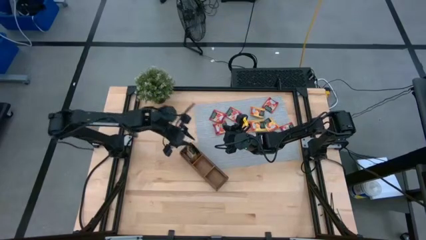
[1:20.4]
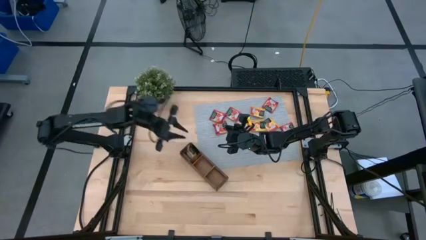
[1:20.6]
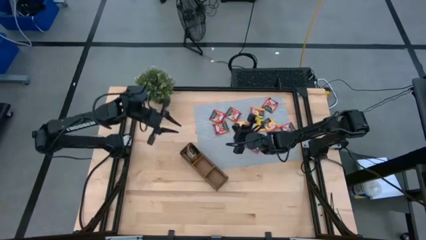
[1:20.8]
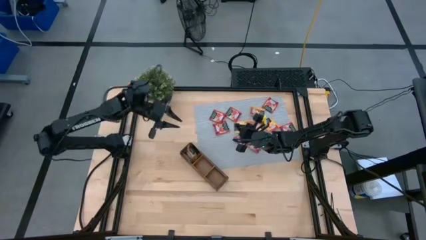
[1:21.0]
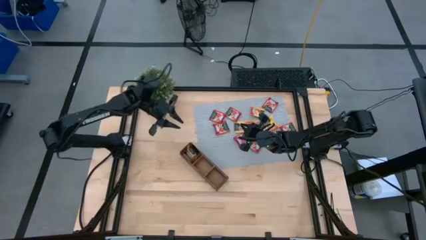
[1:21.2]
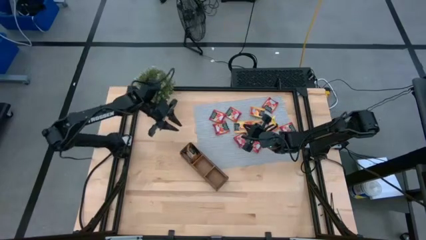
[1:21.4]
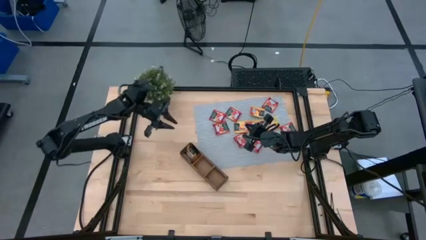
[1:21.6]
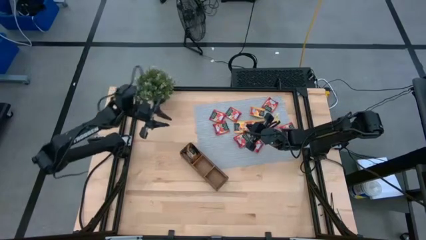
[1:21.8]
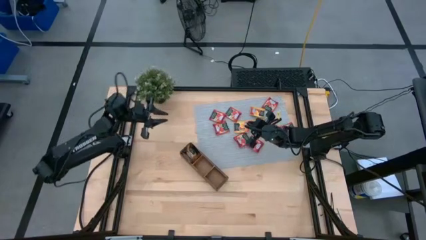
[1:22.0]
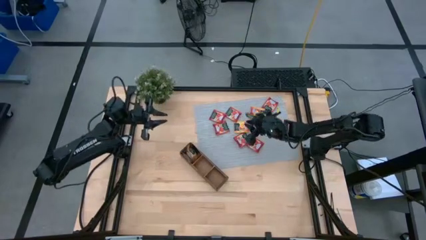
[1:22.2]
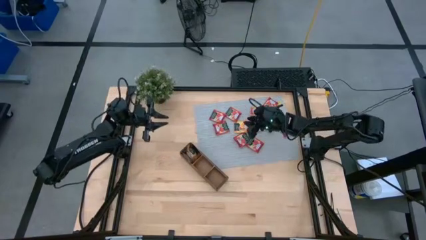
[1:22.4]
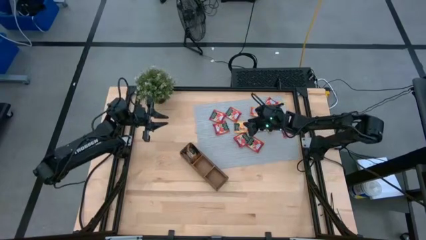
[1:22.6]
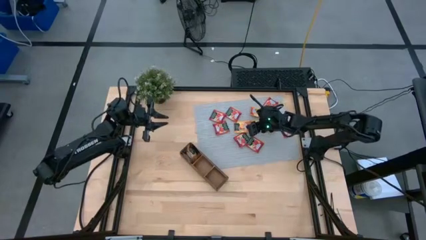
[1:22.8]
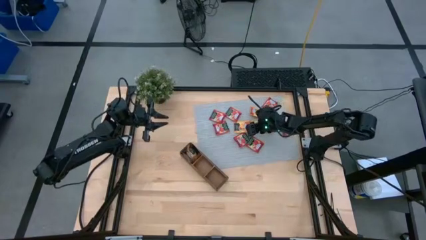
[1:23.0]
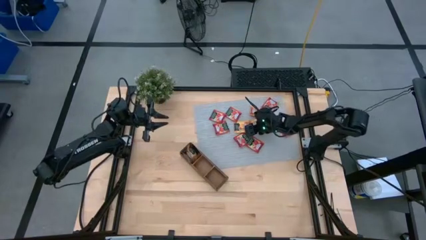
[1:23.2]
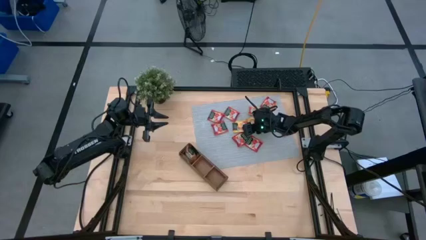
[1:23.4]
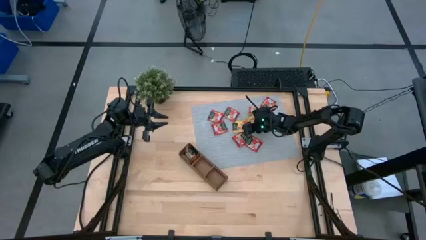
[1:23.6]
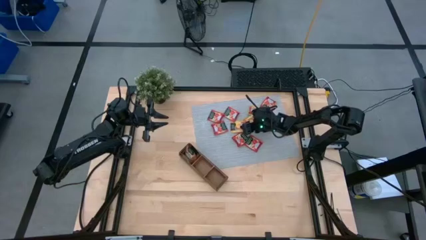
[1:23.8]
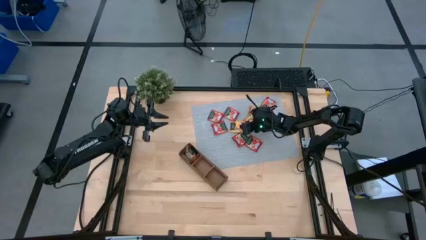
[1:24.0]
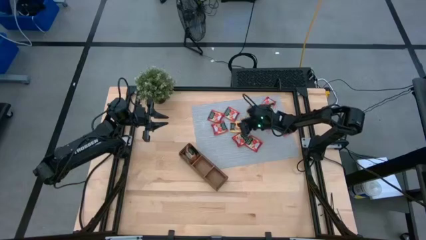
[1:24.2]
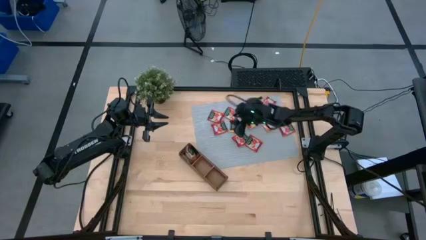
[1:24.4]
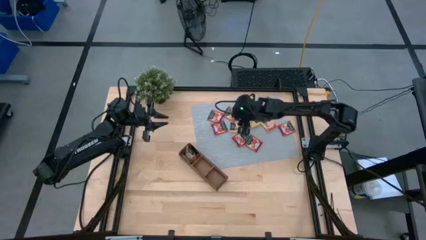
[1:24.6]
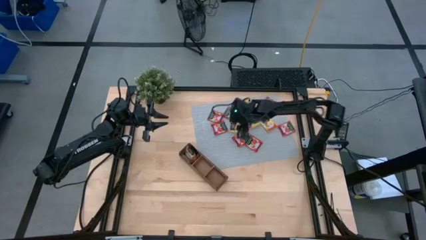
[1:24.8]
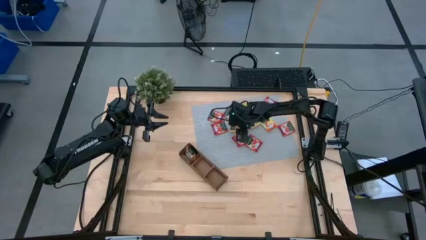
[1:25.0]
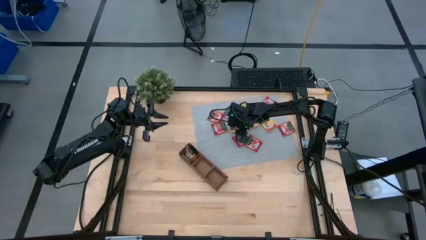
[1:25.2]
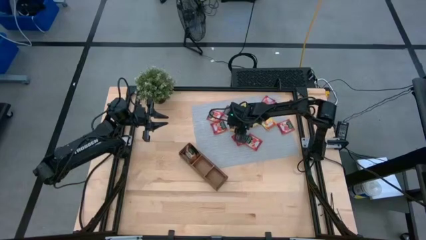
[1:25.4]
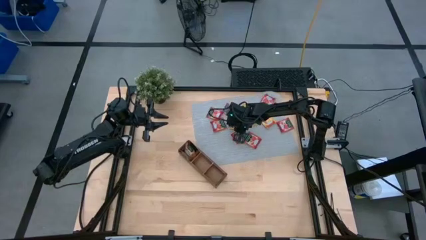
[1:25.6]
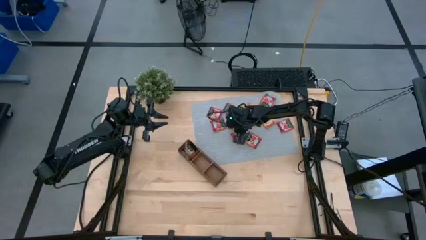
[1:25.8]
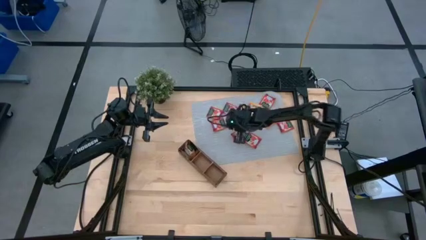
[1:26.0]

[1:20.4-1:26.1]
Task: Pick & Place Tea
Put the yellow tea bag into the middle section of the wooden organizer

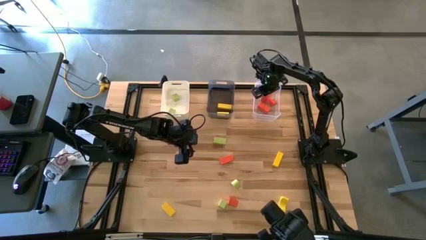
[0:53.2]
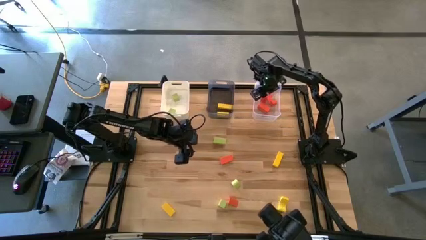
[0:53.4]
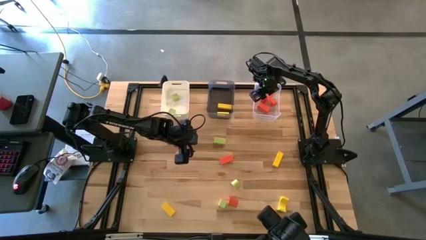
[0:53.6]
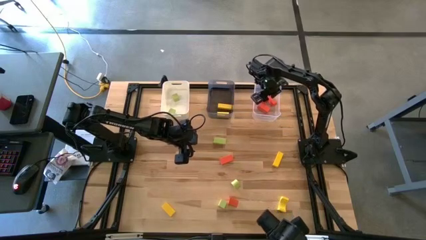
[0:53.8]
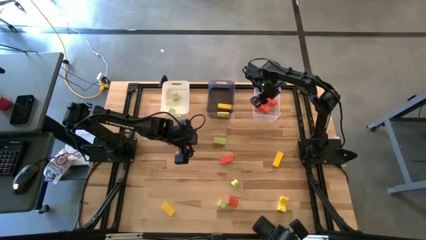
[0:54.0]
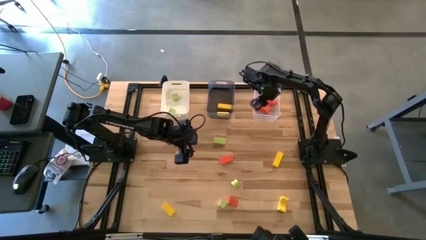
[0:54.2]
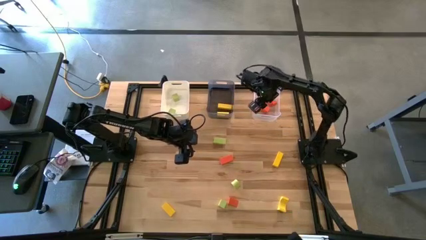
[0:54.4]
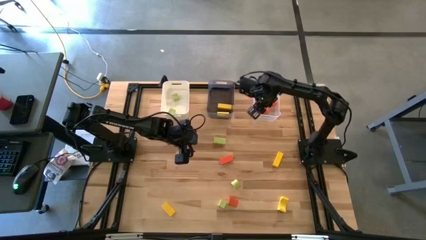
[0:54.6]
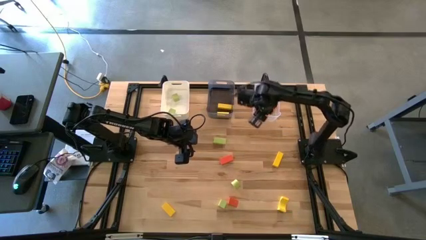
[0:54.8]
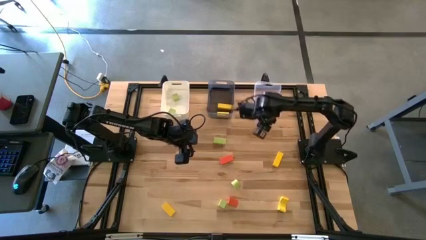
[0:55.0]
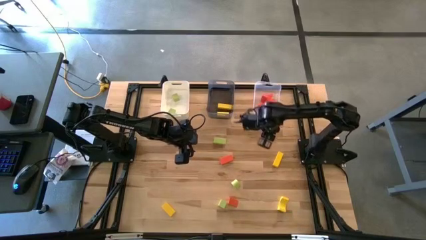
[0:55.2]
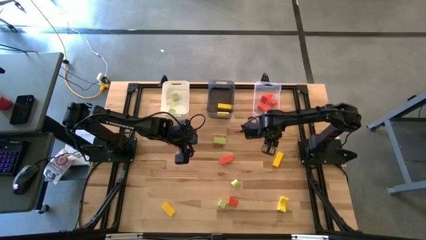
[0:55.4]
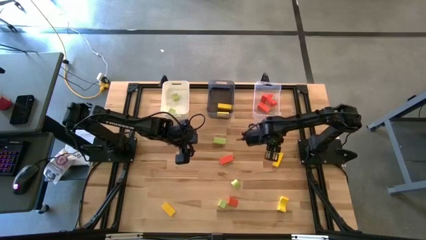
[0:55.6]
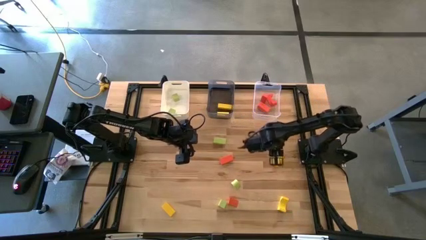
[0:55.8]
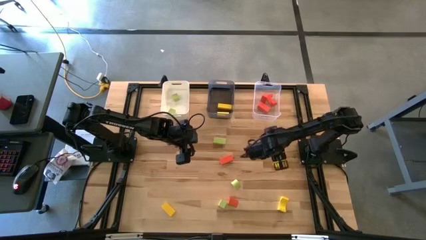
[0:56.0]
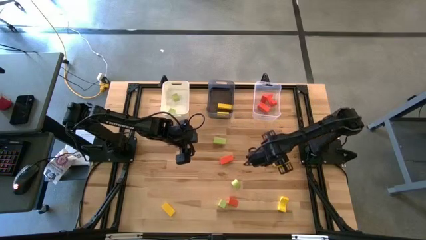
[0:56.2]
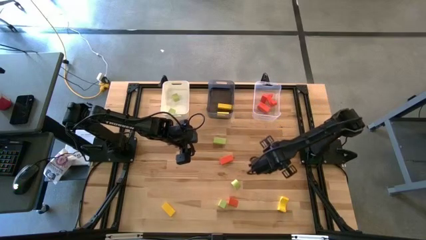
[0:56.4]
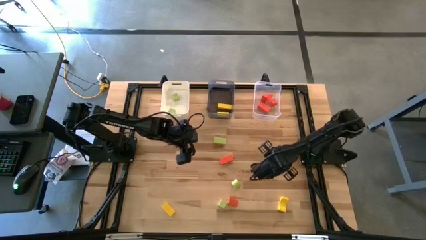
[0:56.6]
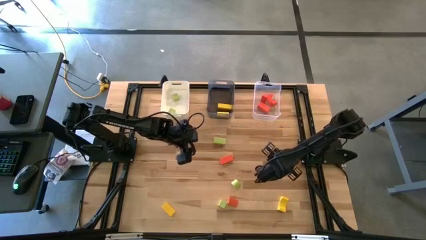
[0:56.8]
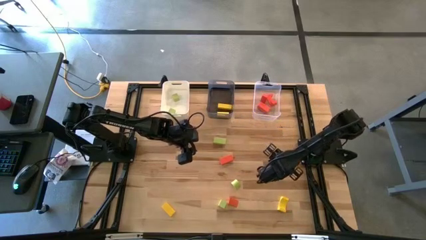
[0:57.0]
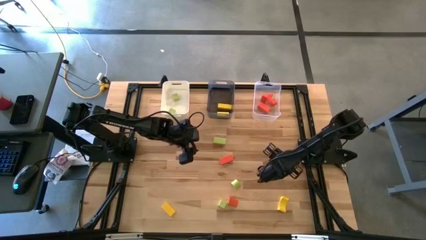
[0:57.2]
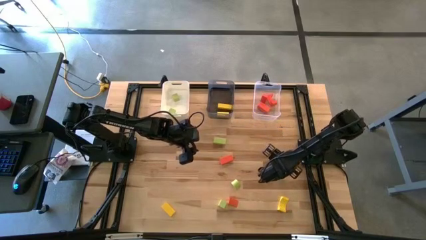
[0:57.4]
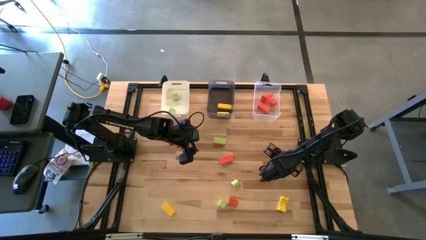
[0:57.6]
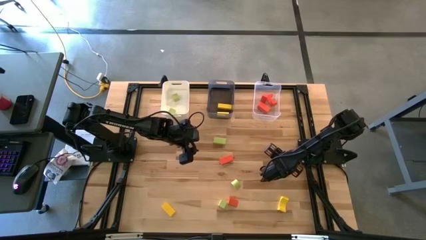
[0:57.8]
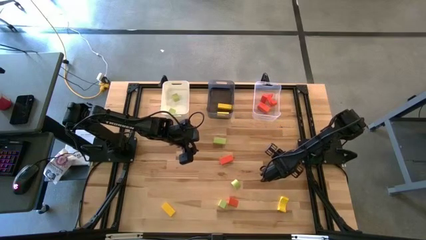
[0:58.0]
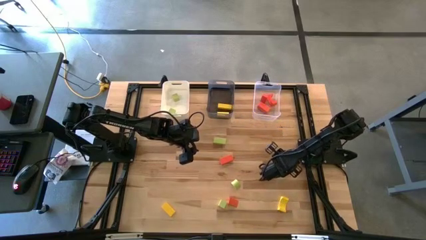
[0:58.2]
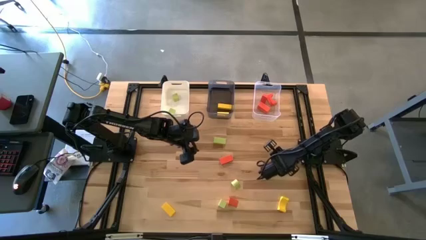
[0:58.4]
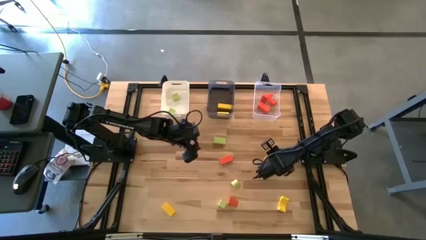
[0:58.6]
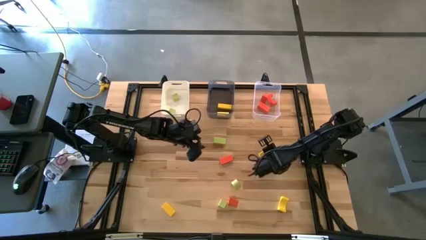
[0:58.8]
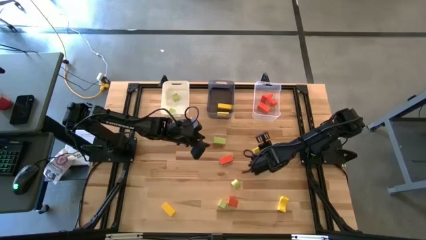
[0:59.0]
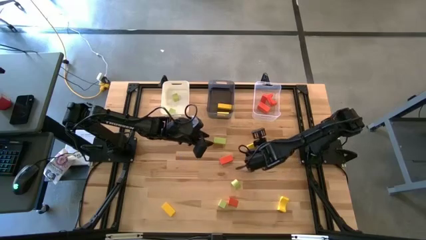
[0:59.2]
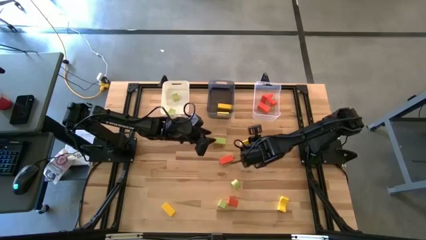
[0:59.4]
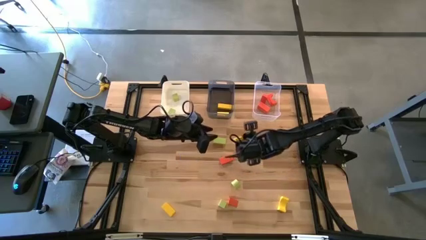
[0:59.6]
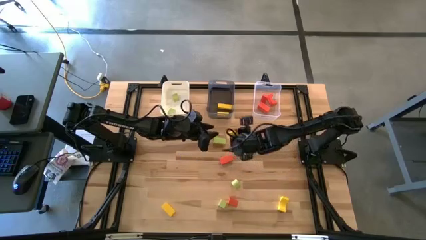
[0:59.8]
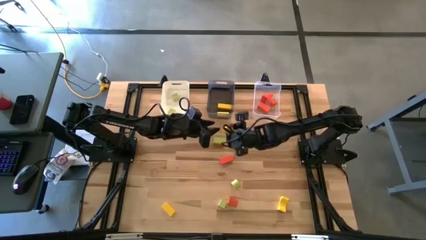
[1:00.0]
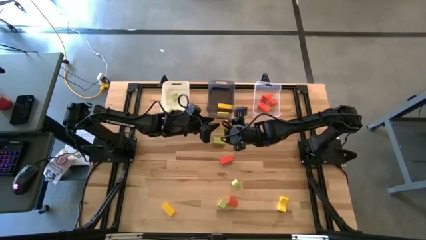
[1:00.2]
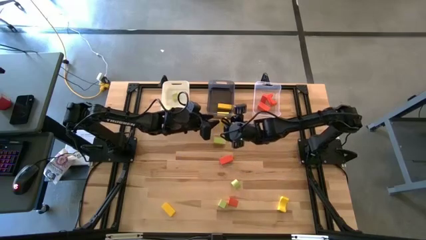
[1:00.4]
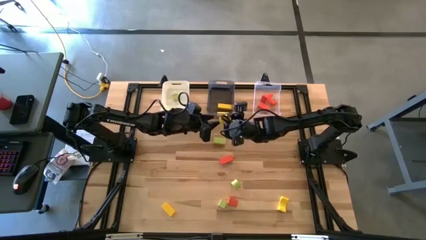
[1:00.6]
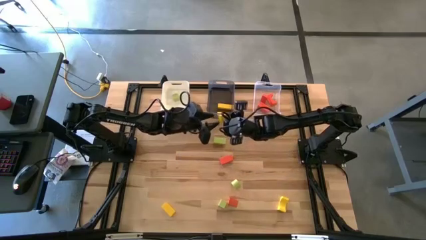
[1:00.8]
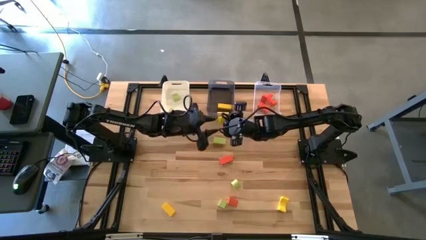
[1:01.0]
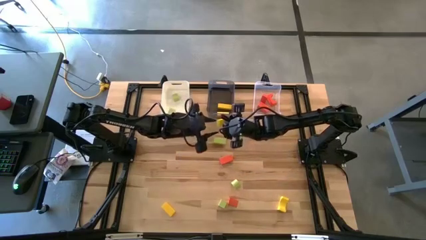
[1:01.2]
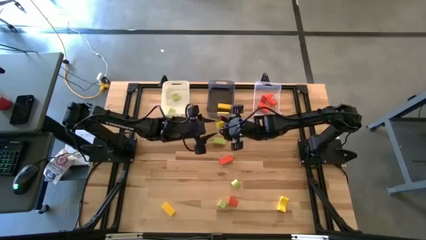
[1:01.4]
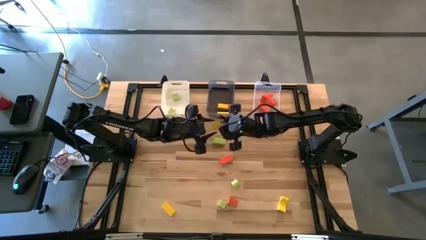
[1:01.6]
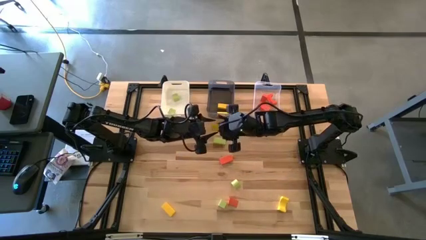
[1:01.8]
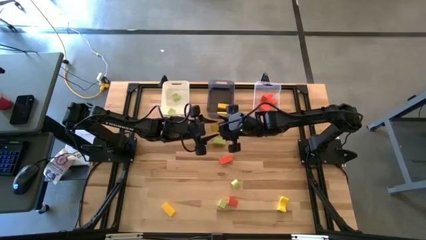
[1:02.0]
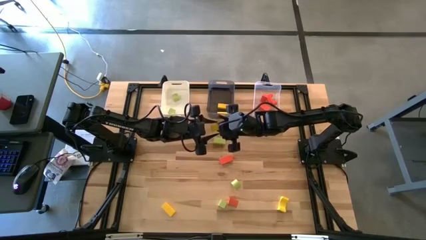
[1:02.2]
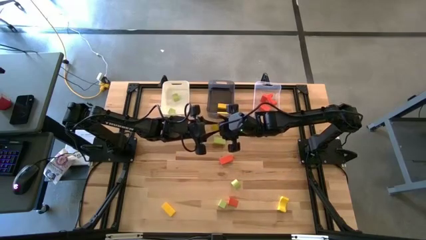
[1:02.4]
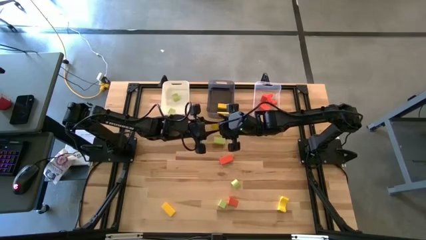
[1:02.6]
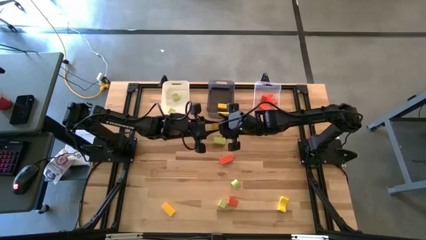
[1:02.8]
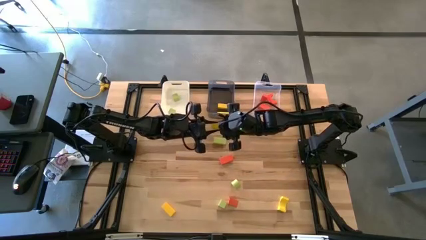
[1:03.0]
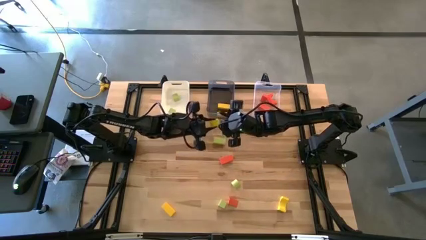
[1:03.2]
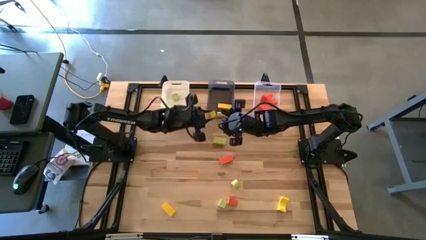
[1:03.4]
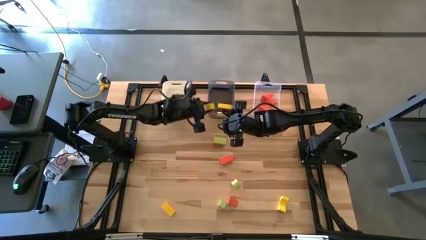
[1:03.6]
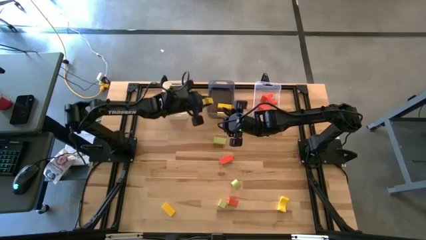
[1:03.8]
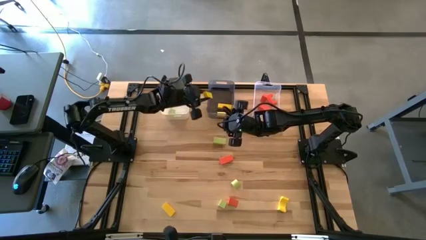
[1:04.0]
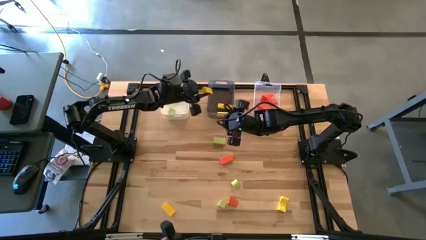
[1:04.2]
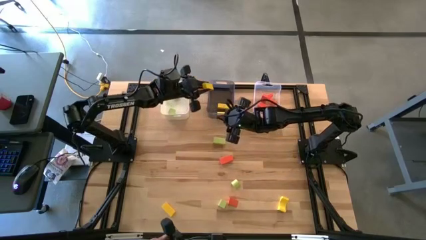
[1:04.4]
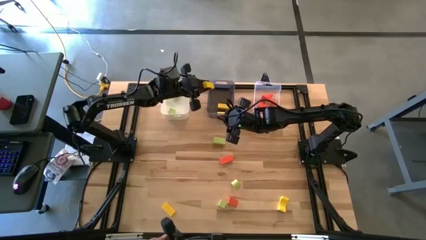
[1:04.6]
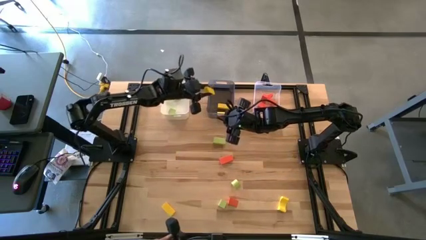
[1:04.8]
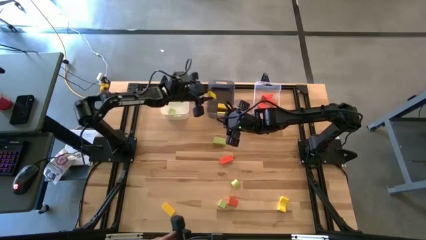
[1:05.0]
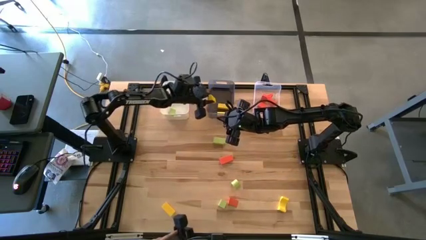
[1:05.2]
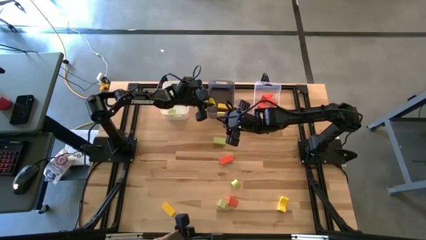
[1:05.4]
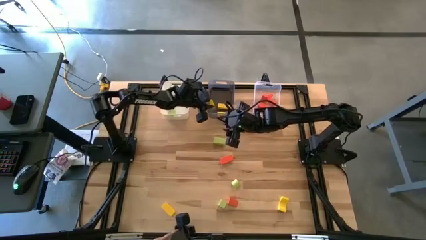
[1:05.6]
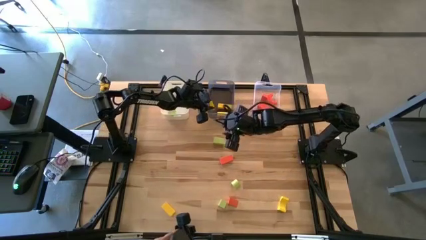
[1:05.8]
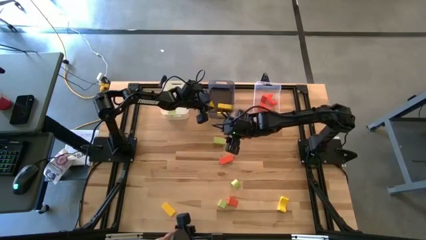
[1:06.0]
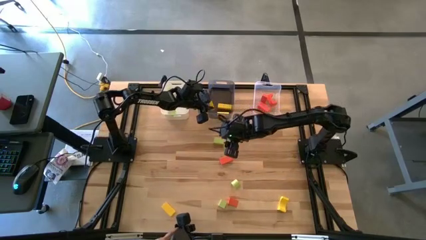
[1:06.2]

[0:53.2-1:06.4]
Task: Sort & place blocks by color
Put the yellow block into the black bin
